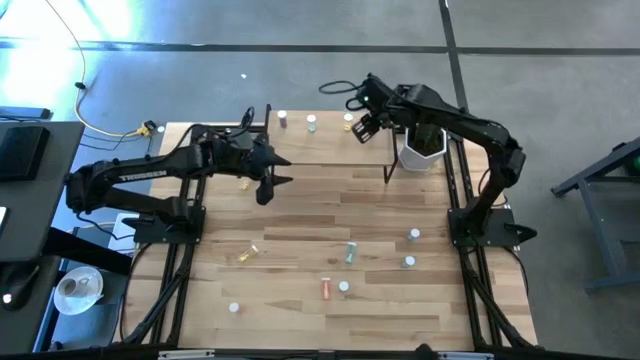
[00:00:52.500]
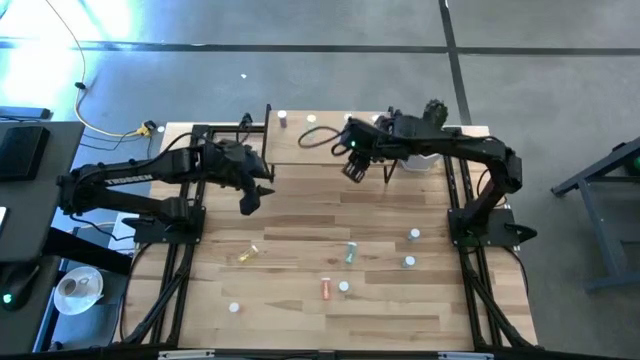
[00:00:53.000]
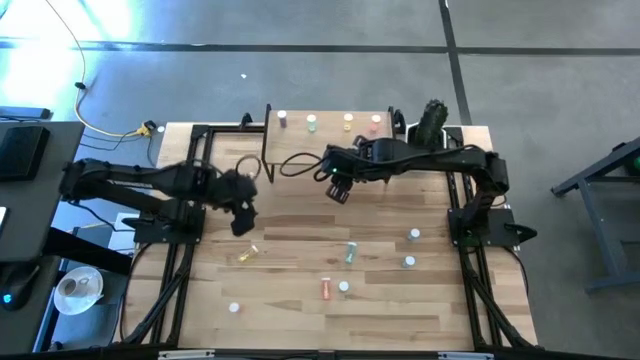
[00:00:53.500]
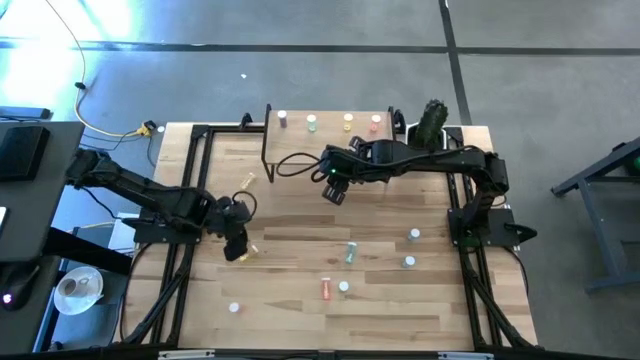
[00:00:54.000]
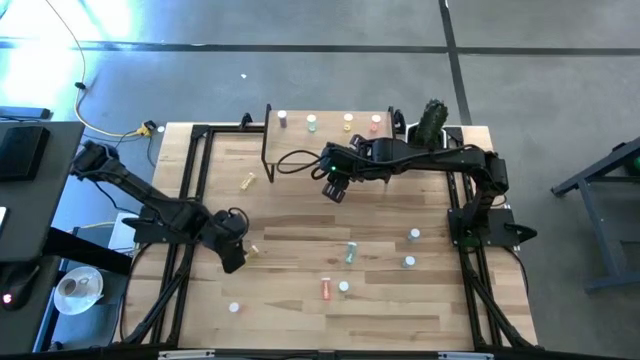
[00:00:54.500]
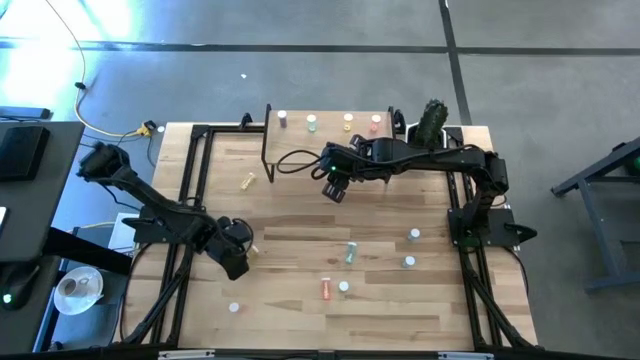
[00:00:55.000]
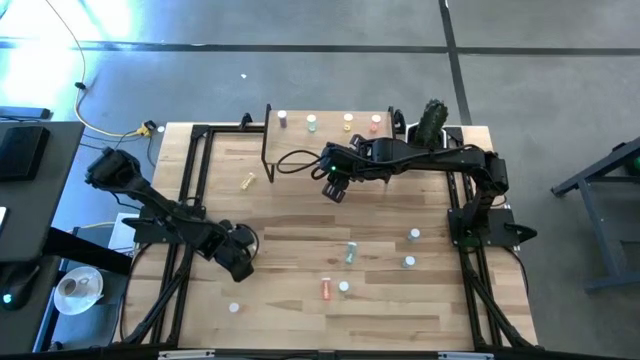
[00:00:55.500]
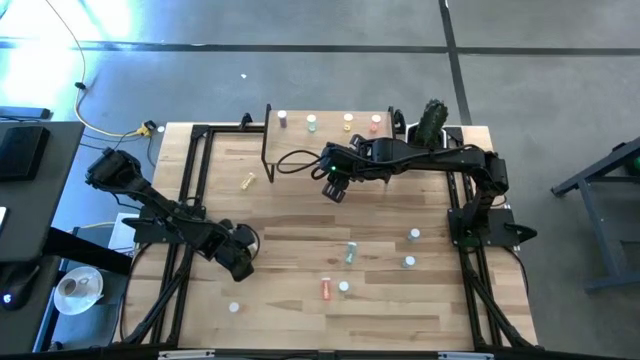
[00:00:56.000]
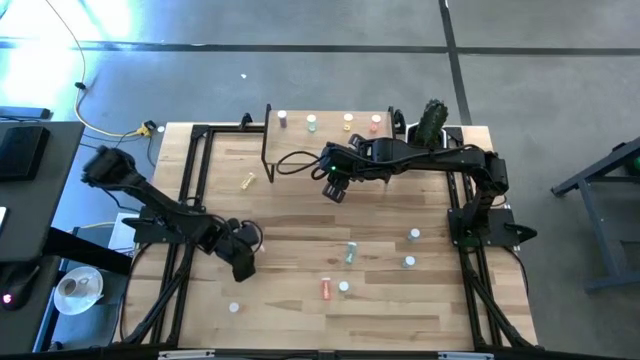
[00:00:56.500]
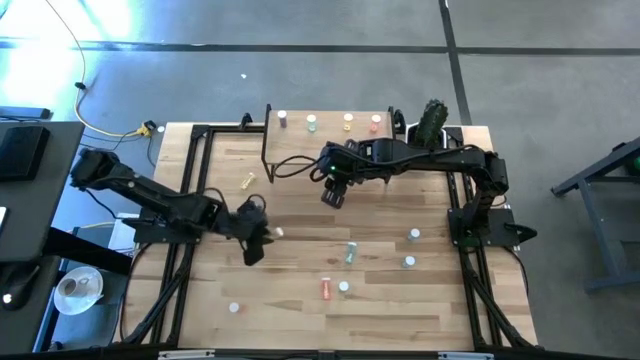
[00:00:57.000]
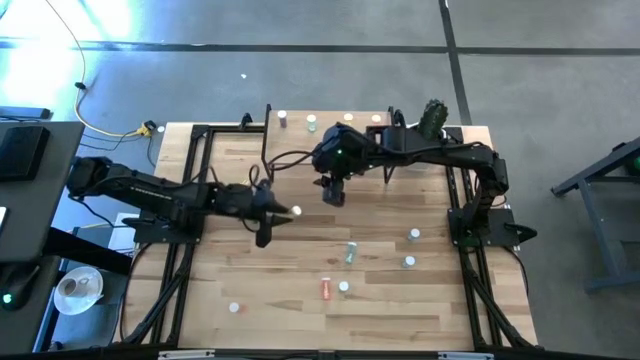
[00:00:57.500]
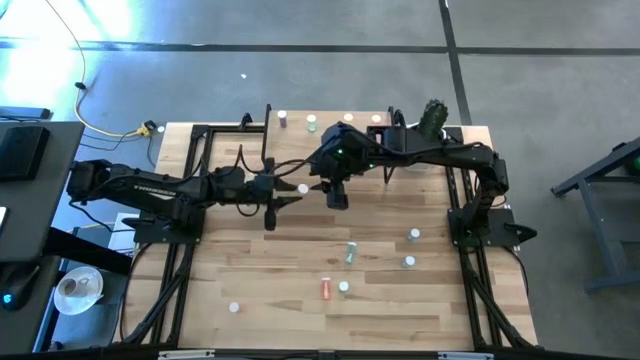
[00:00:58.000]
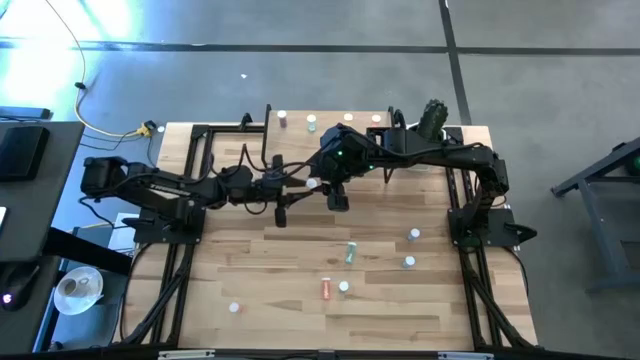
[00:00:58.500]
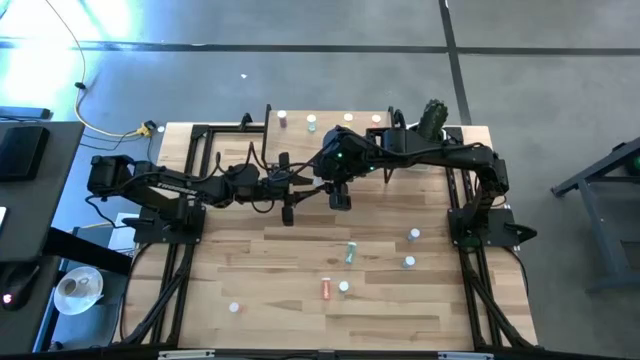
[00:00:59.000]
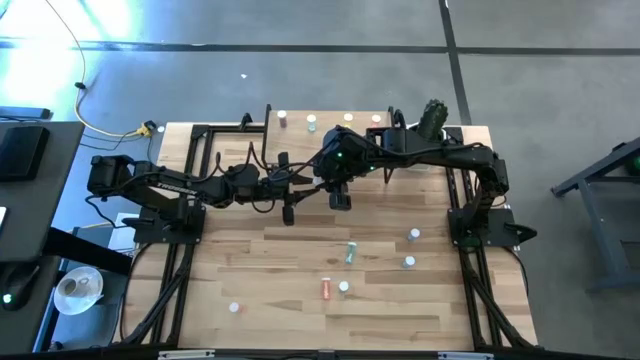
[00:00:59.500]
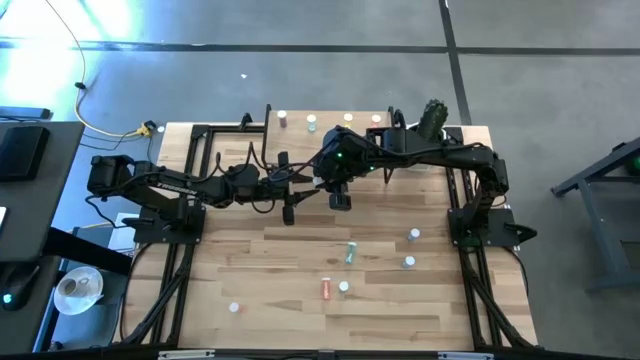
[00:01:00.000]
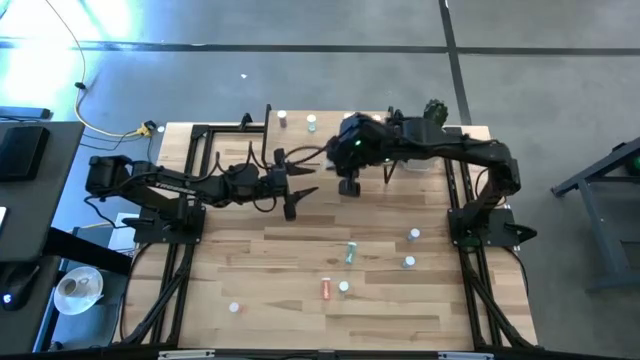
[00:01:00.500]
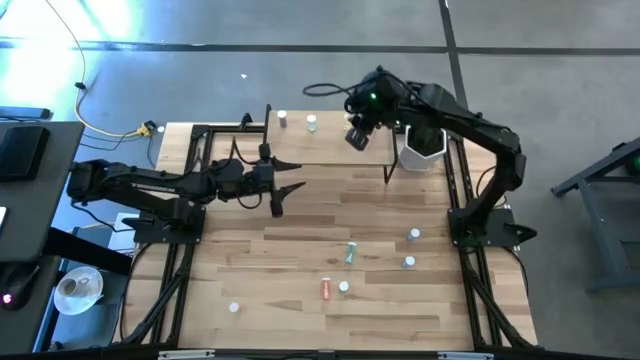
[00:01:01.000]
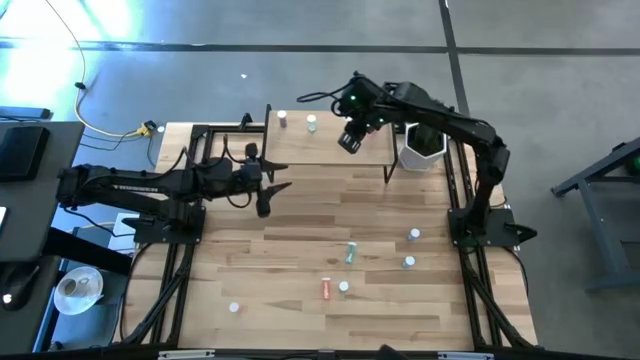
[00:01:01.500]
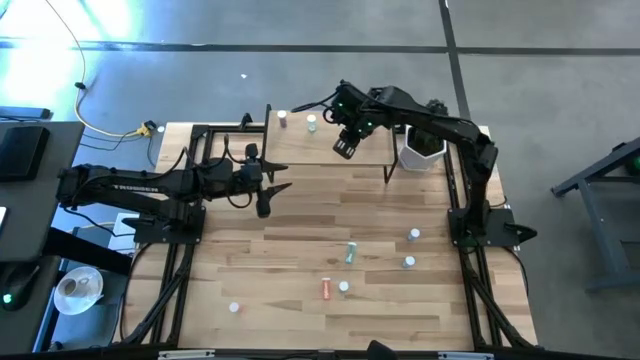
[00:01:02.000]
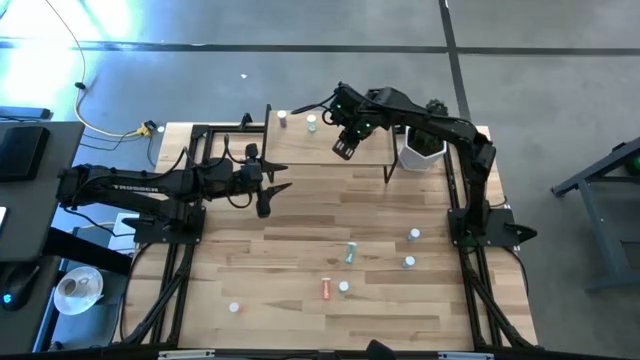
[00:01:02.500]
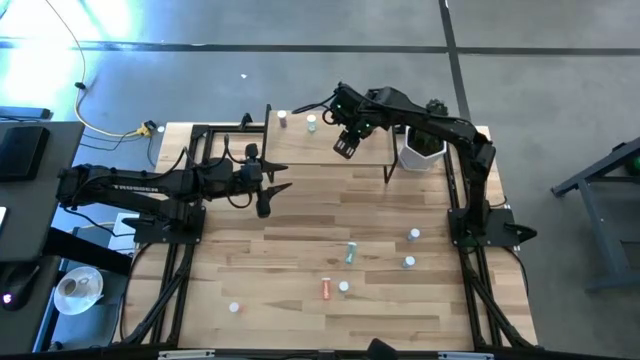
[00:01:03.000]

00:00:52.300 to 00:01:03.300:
Task: Pick and place medicine bottles onto shelf by color
Put the bottom yellow pill bottle on the shelf aligned with the other yellow pill bottle

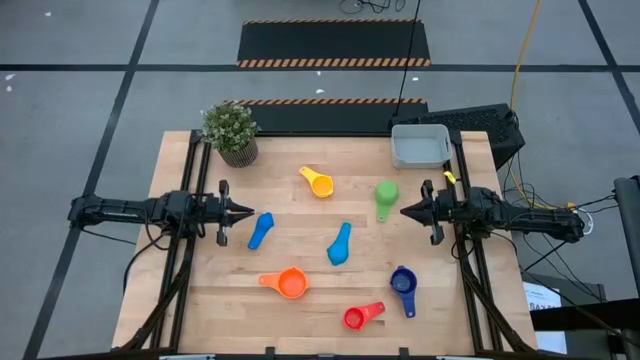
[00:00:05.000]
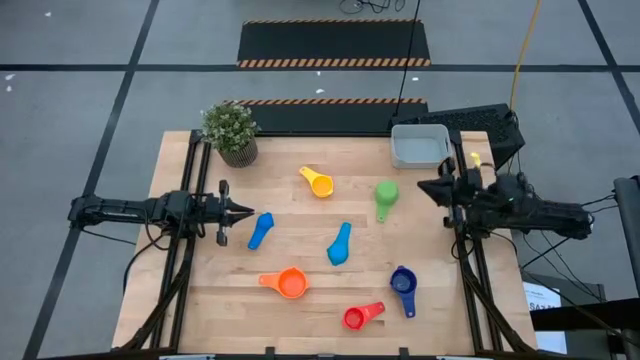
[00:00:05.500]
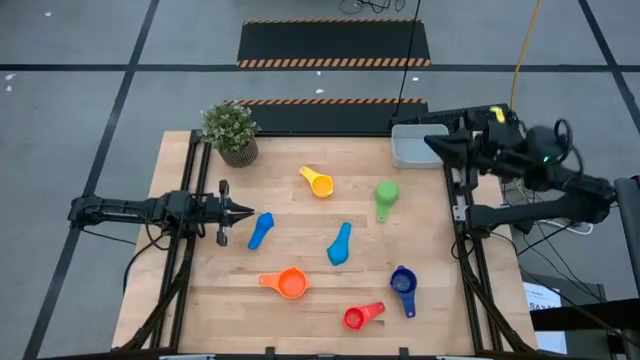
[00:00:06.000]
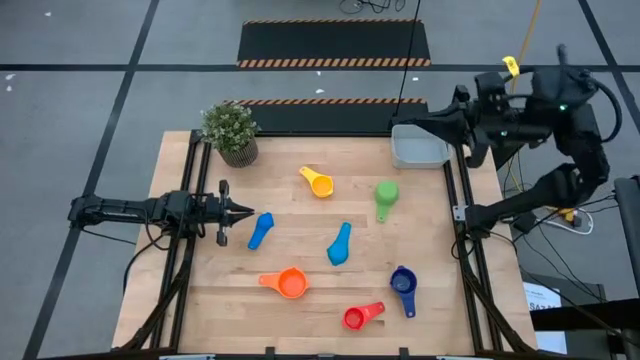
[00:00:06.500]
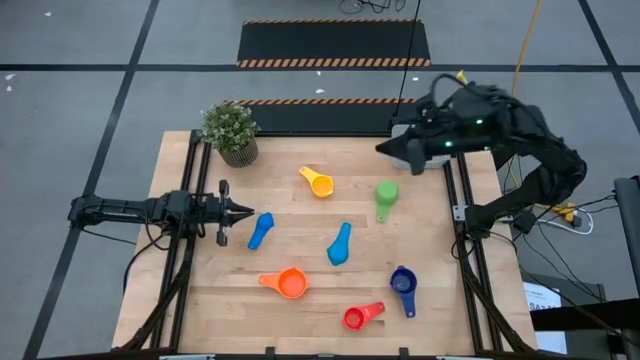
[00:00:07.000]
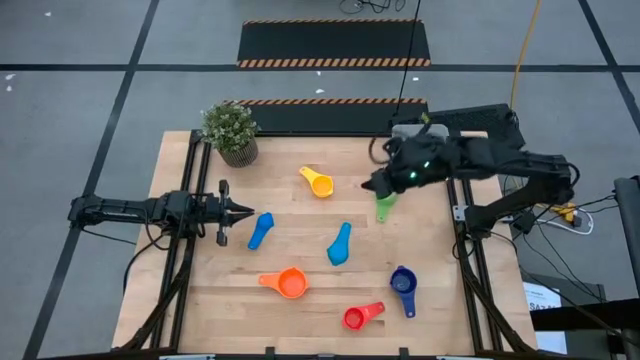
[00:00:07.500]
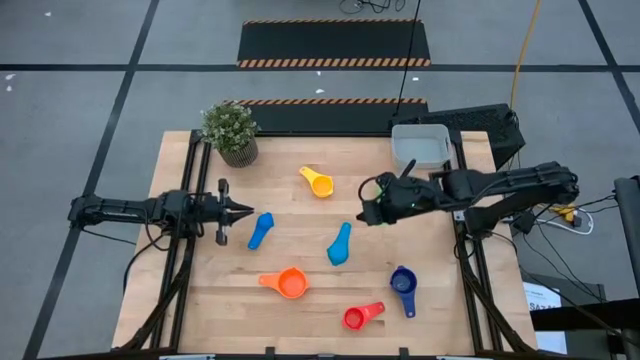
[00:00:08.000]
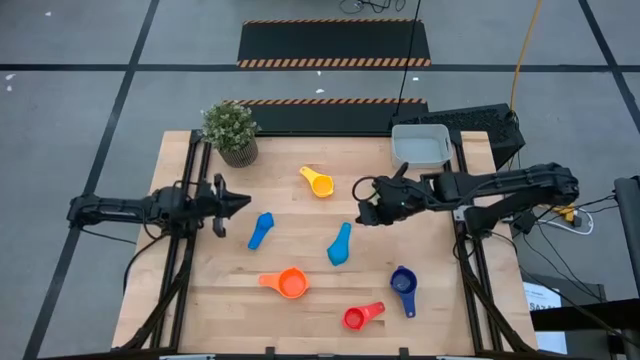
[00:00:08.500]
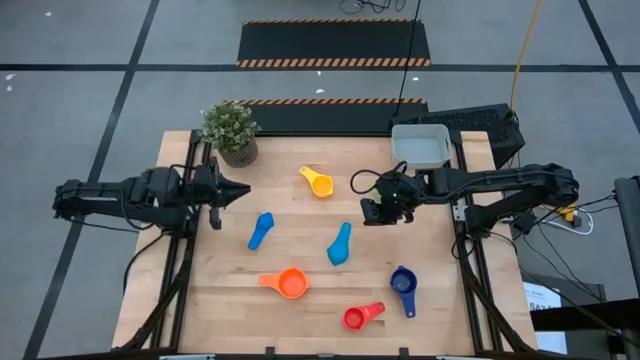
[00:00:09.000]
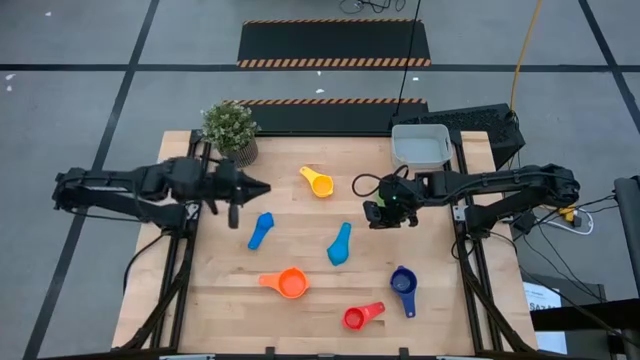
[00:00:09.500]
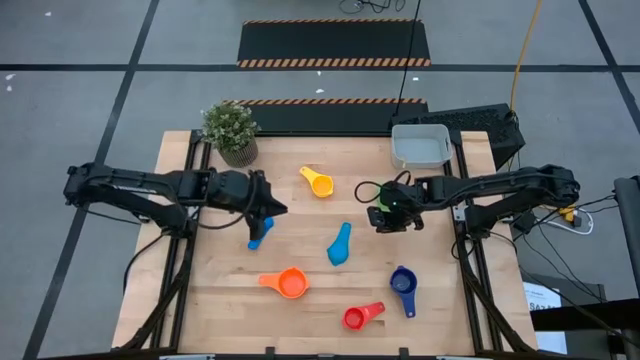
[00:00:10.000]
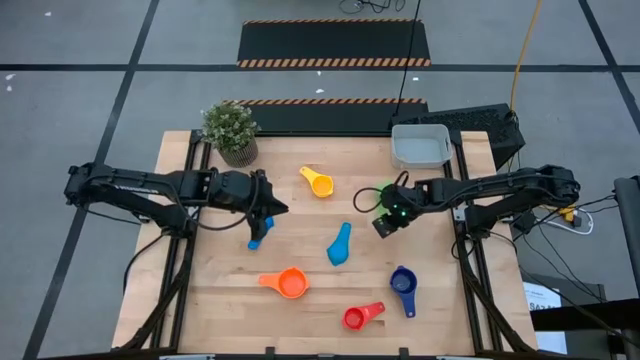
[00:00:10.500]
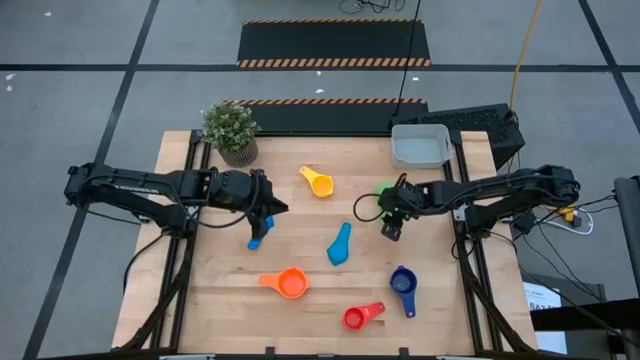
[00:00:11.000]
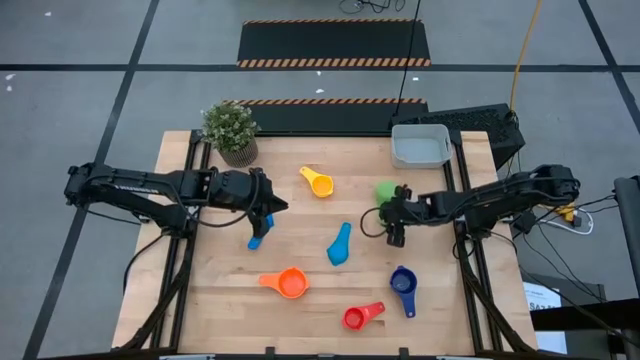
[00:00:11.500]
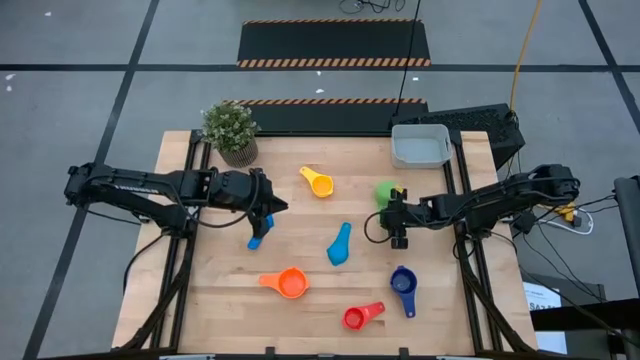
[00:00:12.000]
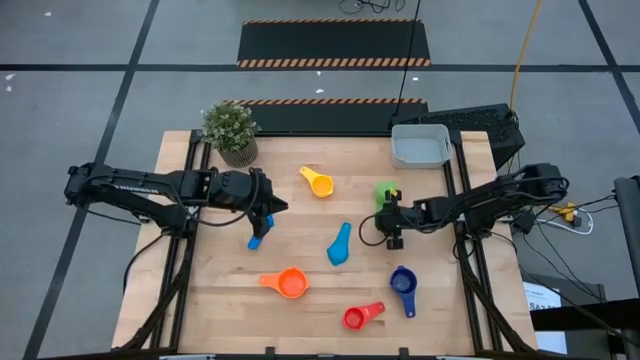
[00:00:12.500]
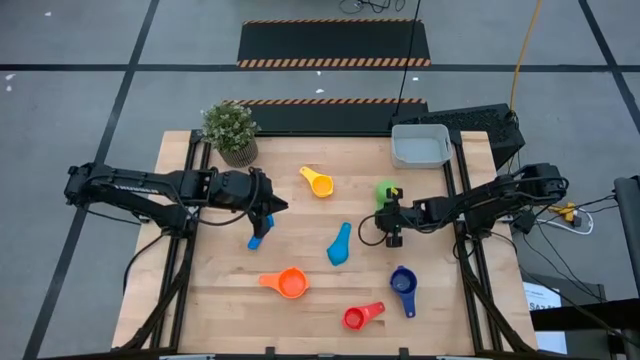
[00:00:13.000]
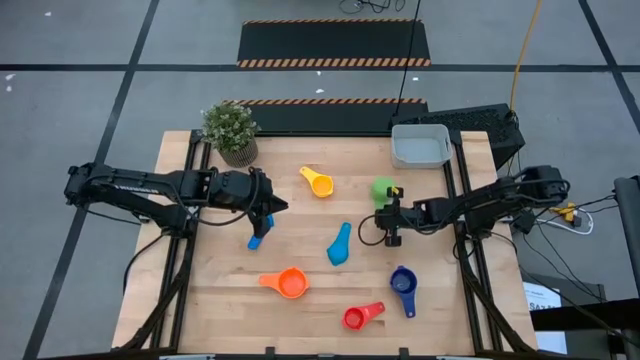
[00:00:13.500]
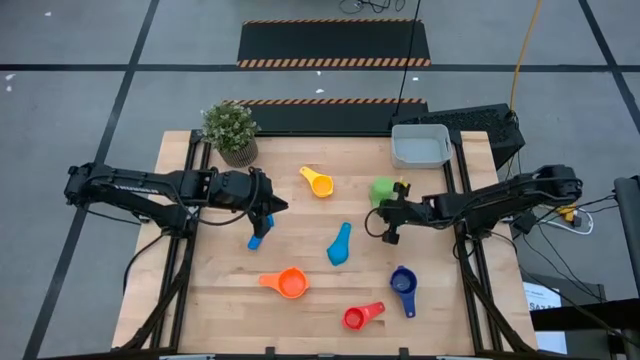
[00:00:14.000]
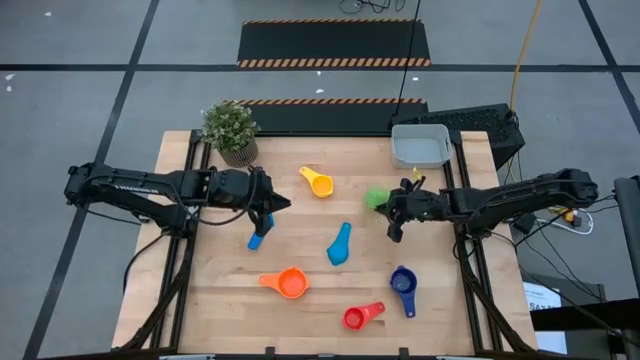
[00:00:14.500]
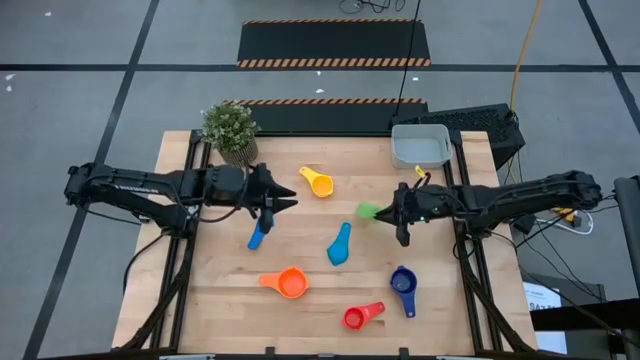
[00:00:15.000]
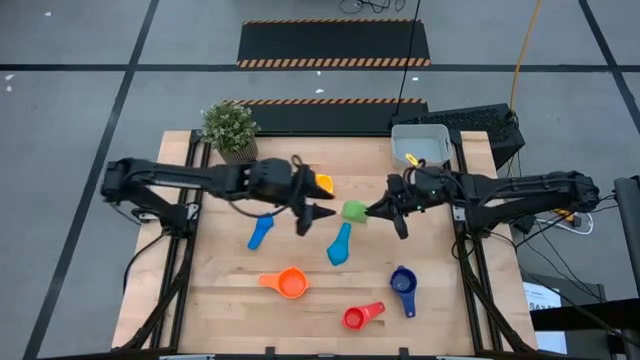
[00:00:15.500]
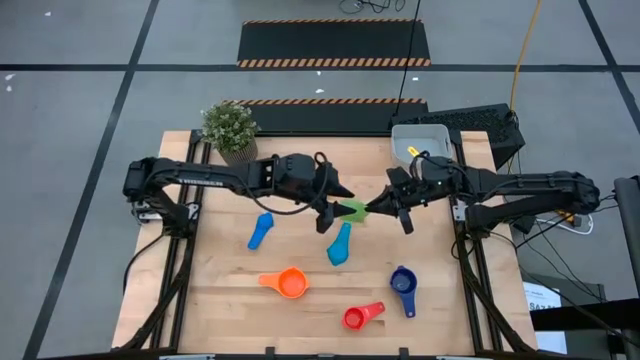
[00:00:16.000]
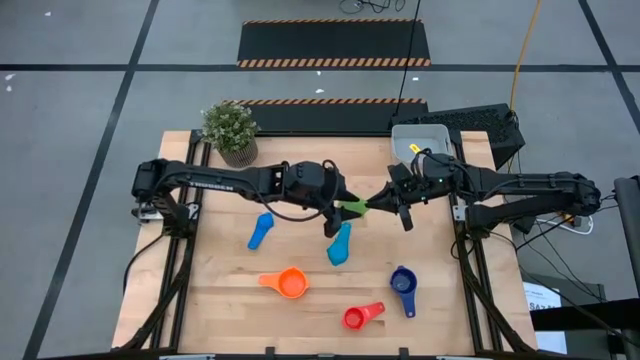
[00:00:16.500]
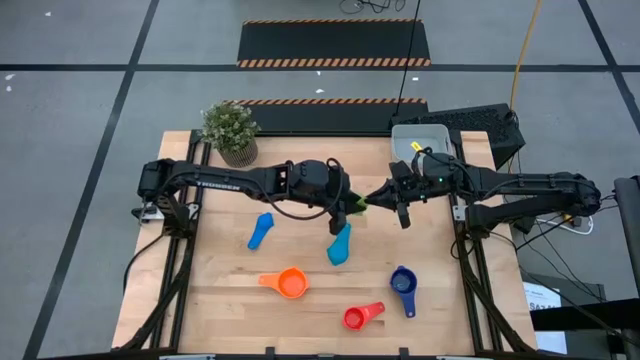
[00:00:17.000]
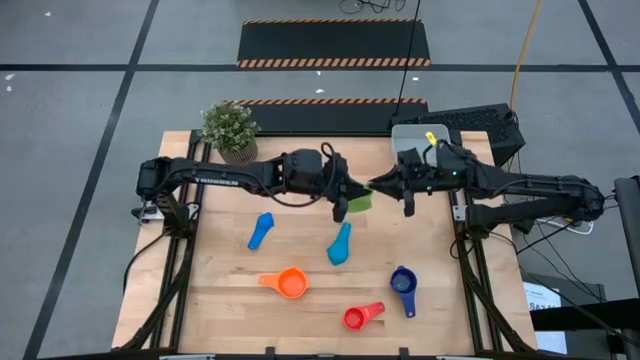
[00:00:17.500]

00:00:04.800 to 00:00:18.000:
Task: Nest measuring cups in basket
Stack the green measuring cup on the orange measuring cup
